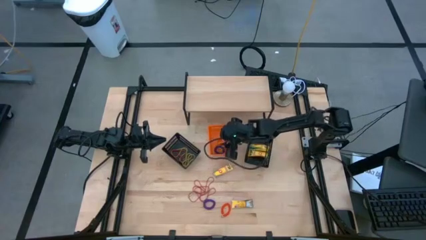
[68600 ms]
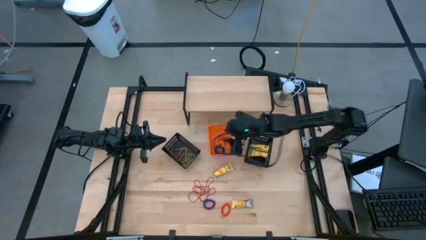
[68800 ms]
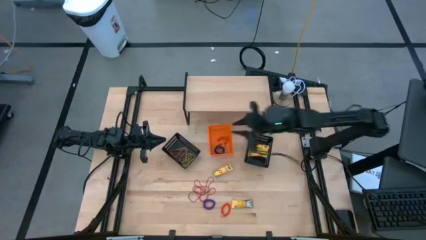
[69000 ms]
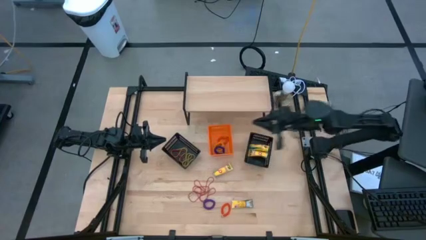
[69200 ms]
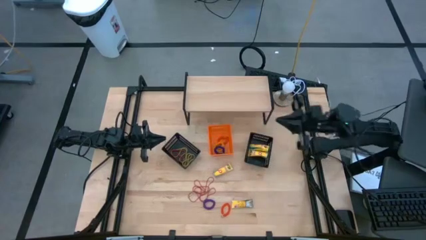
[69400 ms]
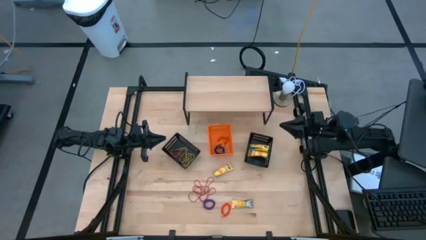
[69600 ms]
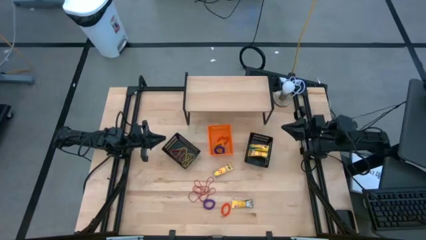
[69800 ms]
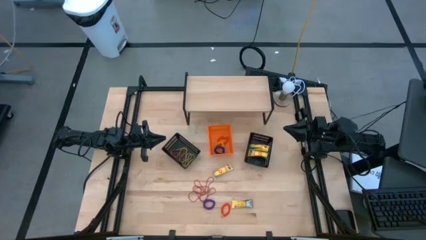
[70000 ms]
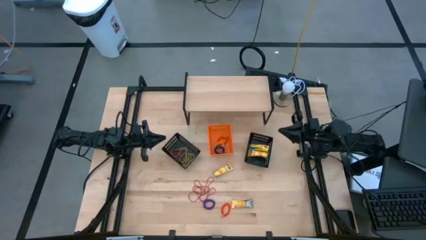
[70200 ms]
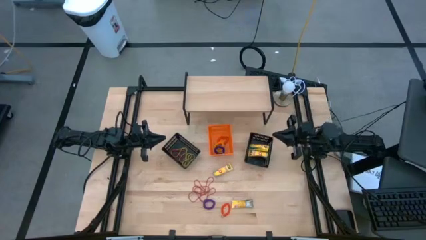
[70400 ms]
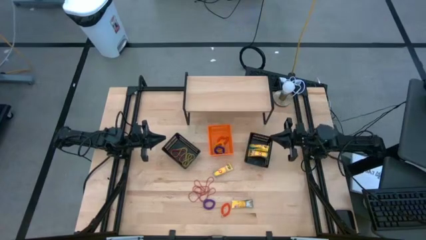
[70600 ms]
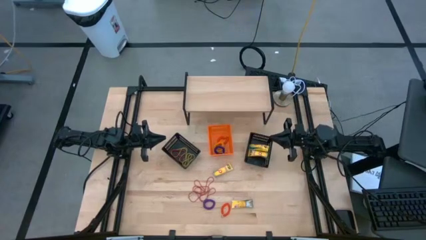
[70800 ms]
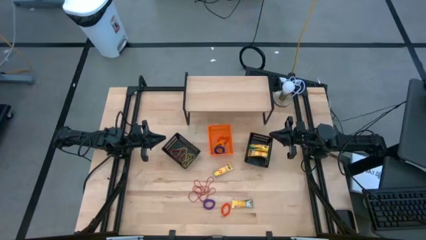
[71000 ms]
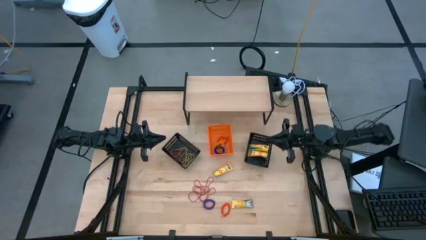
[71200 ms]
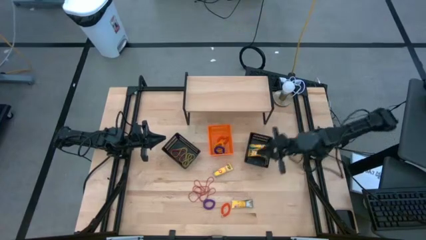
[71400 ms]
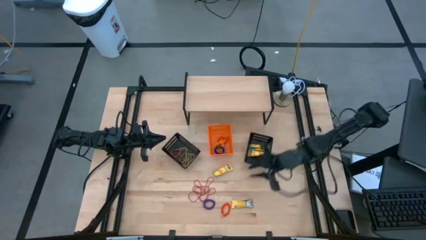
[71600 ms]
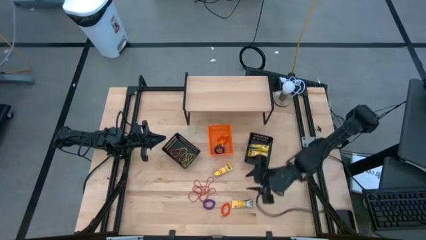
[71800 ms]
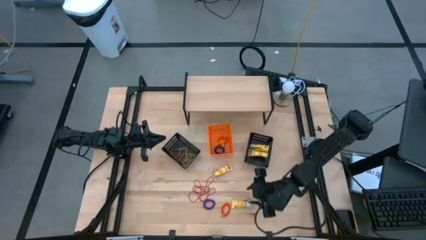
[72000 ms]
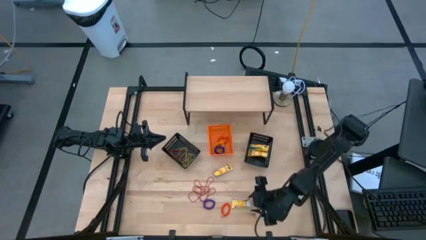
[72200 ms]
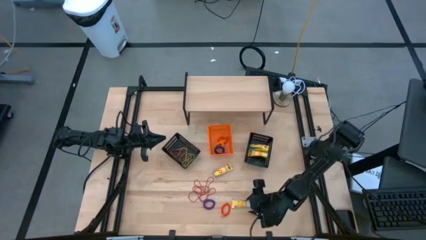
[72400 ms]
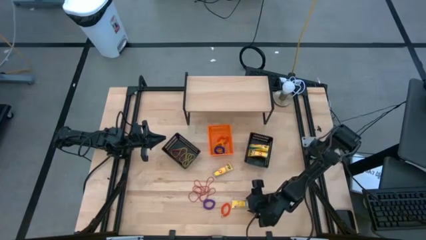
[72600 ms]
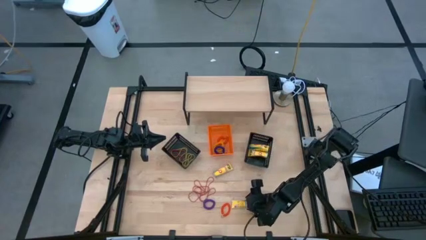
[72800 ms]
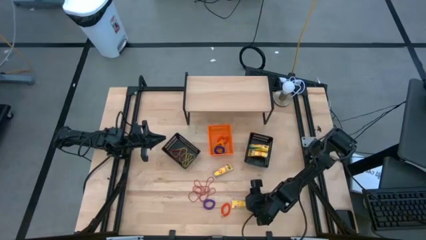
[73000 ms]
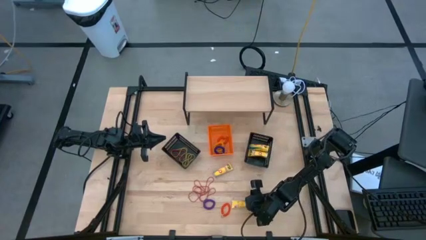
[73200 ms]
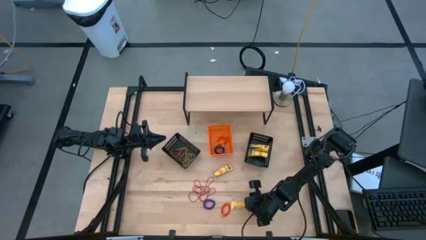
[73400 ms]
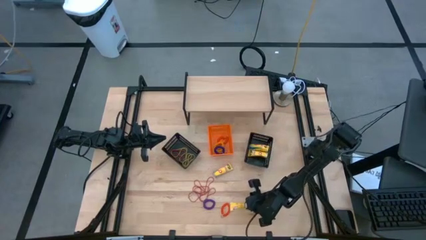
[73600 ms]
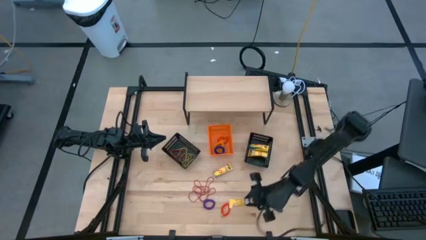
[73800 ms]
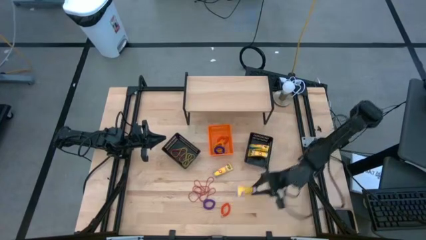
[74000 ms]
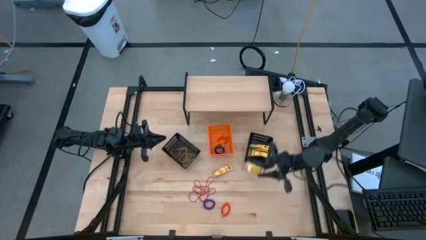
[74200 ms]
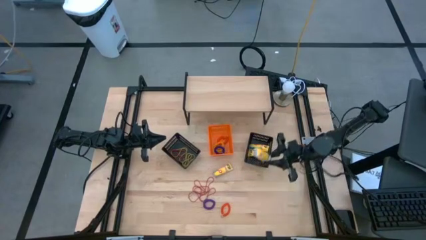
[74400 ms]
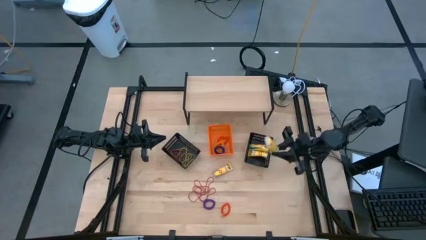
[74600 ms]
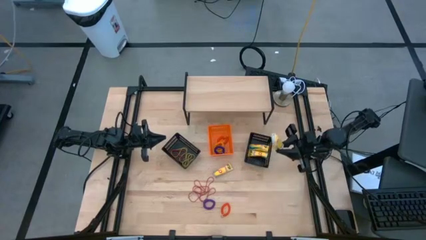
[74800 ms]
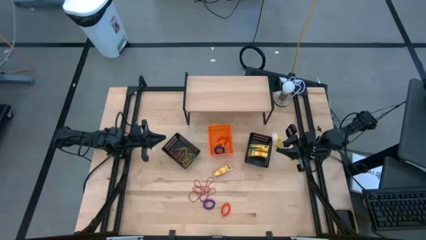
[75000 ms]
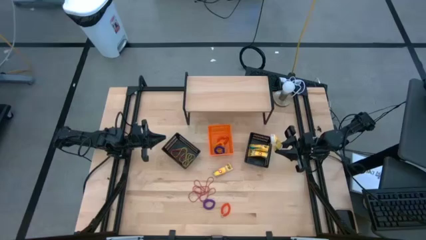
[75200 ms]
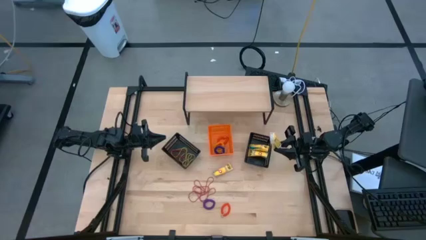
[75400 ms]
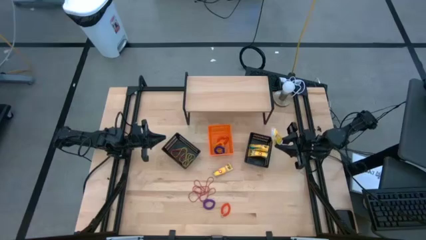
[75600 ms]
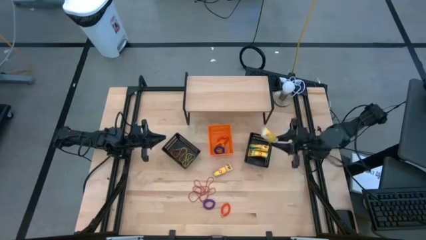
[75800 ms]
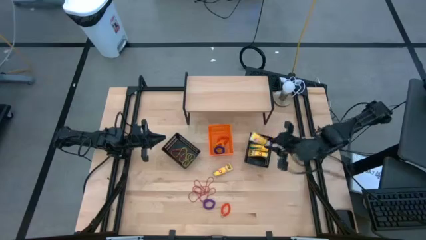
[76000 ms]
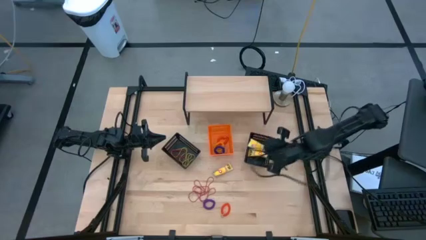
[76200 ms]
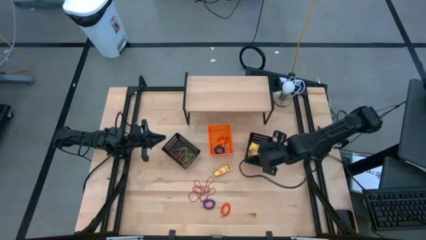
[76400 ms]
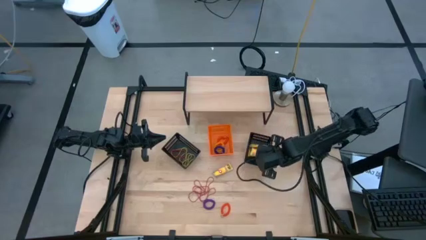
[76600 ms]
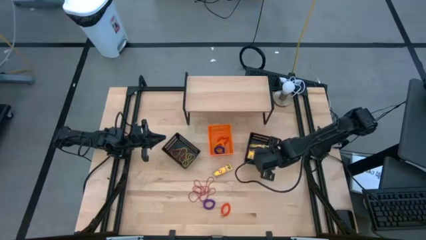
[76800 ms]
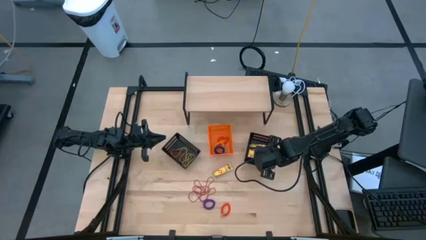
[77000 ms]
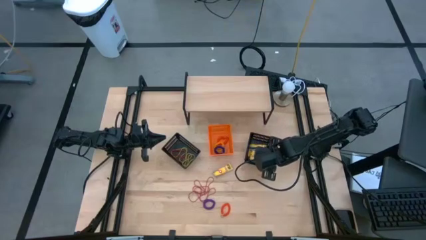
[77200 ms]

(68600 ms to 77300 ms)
Task: Pick & Place Office Desk Supplies
Put the yellow pack of crayons into the right black bin

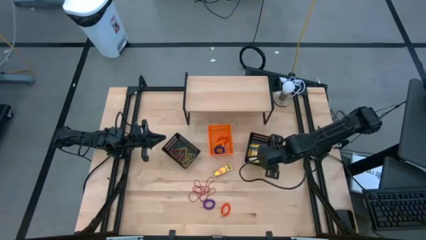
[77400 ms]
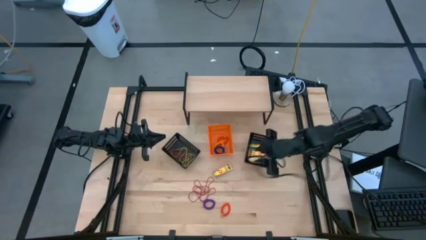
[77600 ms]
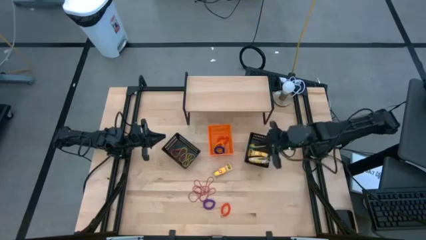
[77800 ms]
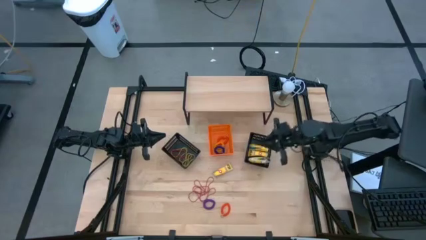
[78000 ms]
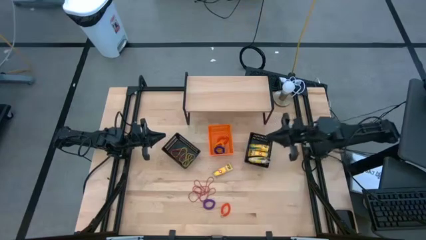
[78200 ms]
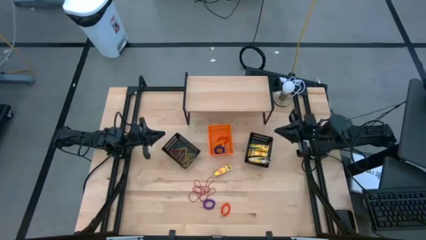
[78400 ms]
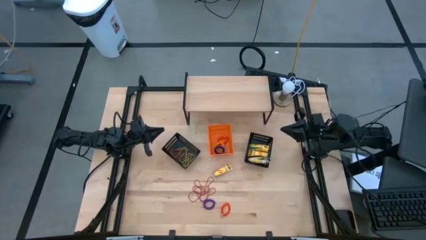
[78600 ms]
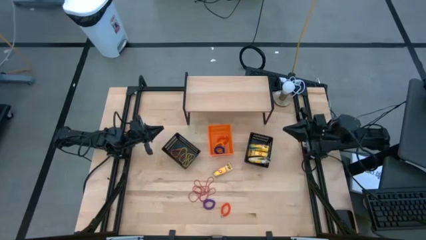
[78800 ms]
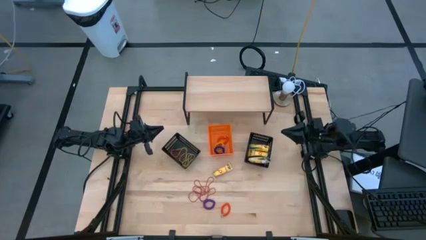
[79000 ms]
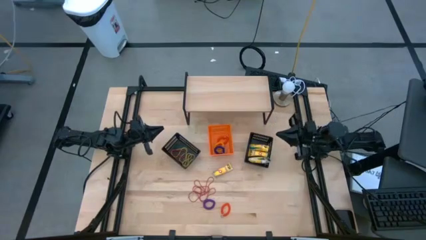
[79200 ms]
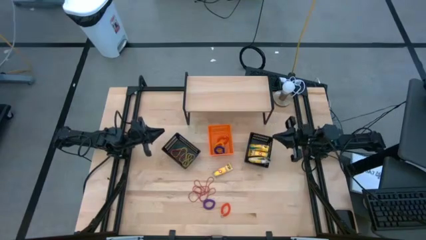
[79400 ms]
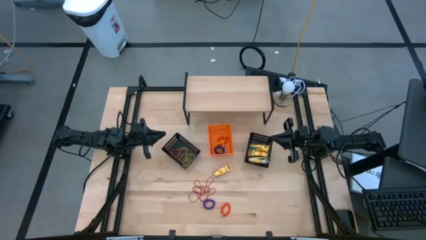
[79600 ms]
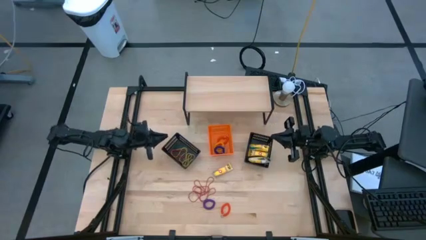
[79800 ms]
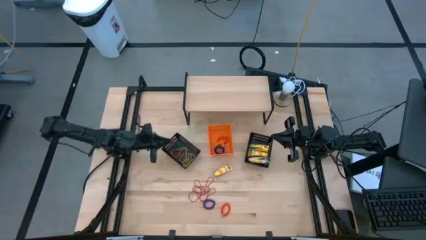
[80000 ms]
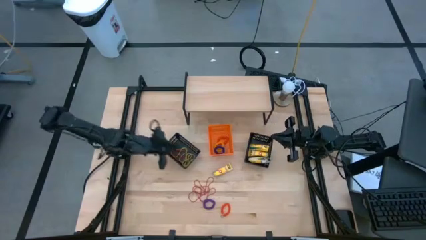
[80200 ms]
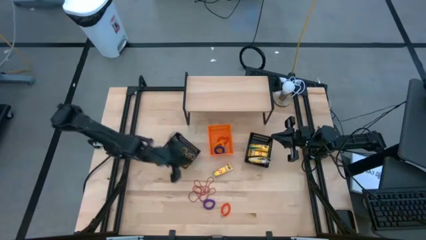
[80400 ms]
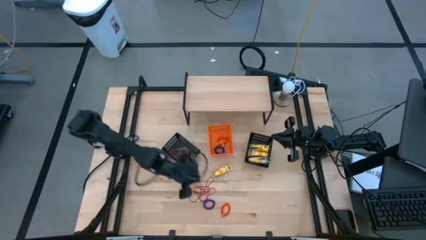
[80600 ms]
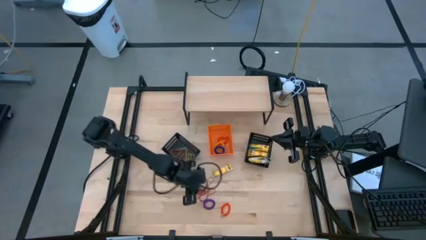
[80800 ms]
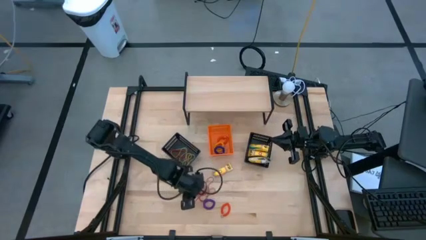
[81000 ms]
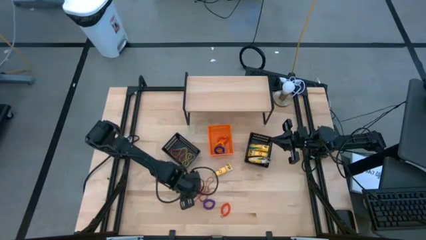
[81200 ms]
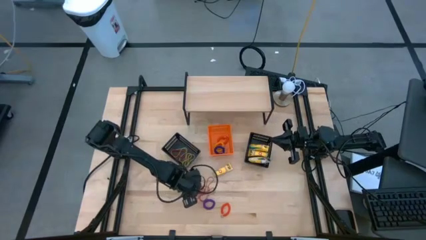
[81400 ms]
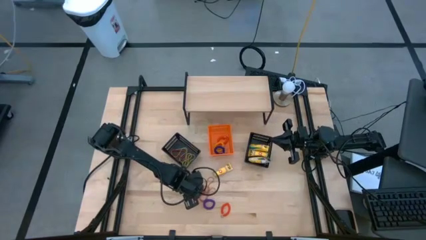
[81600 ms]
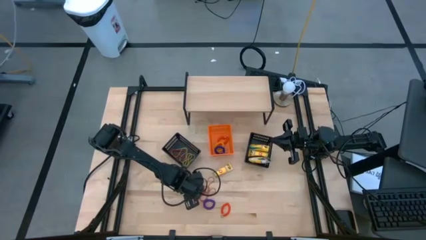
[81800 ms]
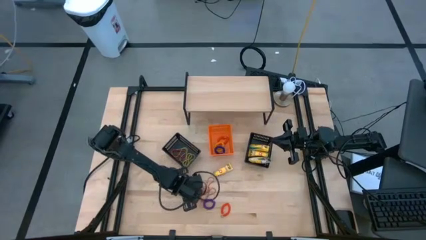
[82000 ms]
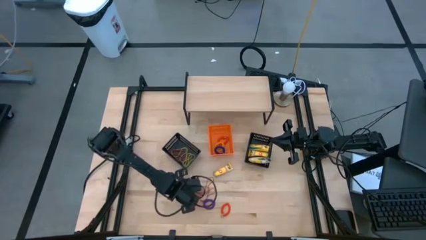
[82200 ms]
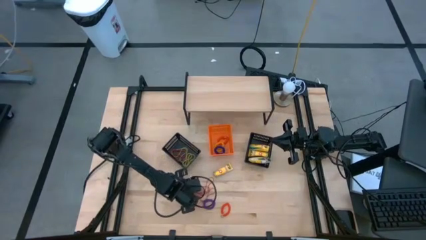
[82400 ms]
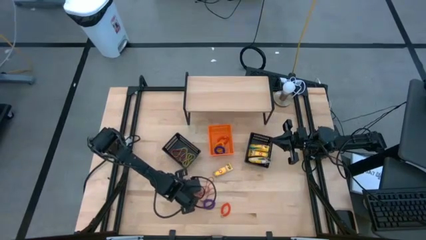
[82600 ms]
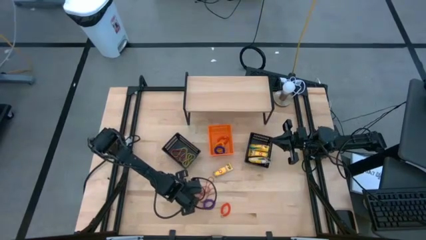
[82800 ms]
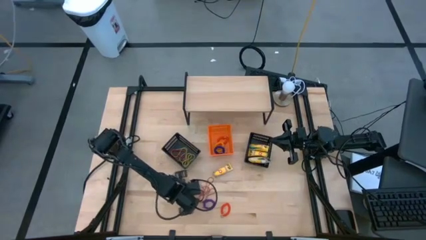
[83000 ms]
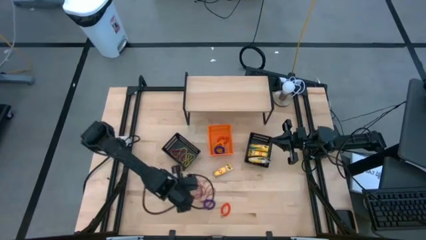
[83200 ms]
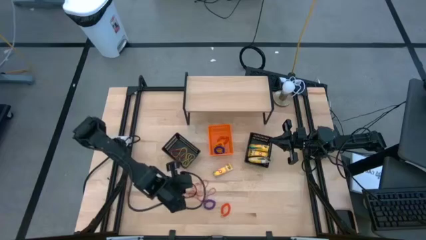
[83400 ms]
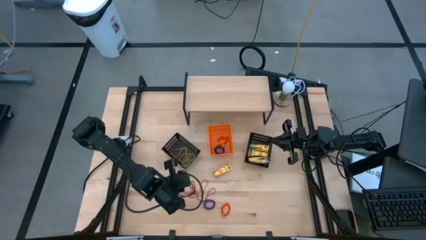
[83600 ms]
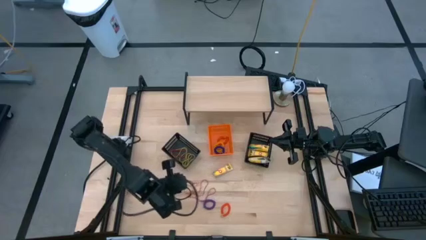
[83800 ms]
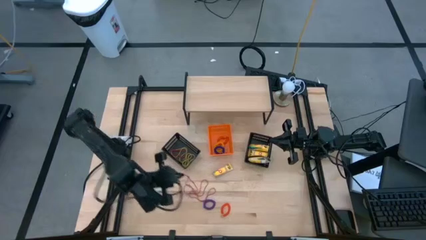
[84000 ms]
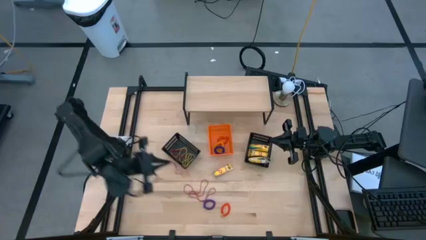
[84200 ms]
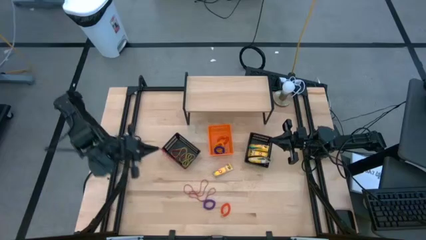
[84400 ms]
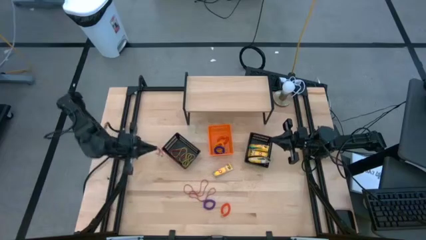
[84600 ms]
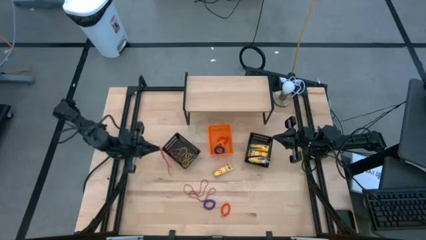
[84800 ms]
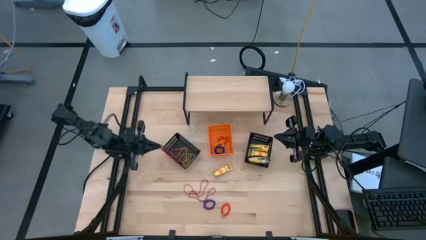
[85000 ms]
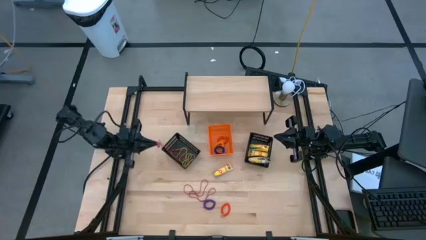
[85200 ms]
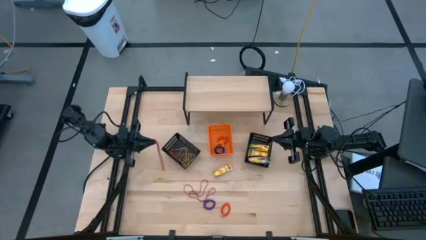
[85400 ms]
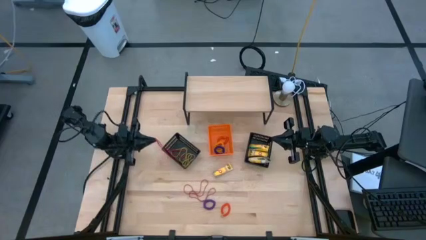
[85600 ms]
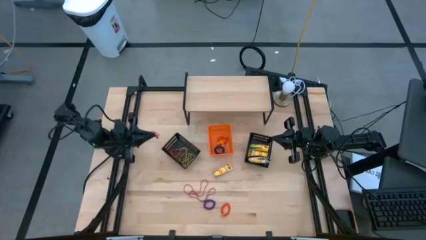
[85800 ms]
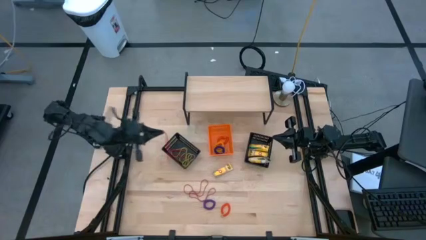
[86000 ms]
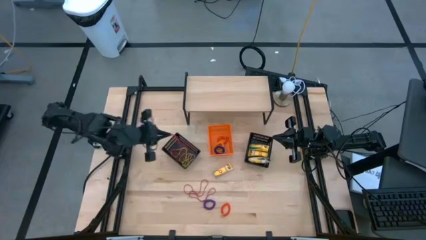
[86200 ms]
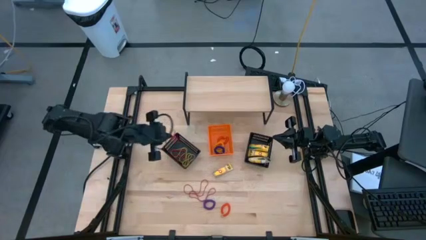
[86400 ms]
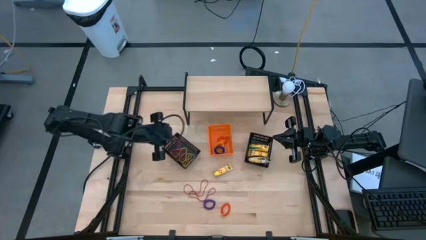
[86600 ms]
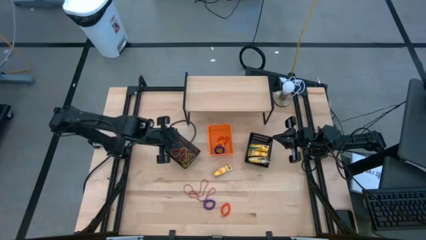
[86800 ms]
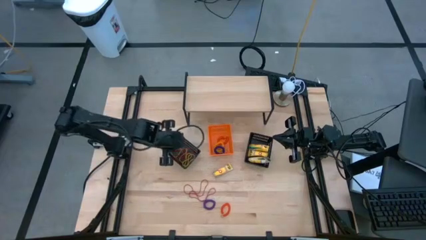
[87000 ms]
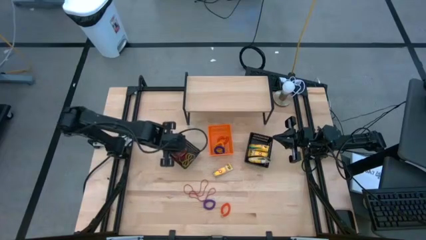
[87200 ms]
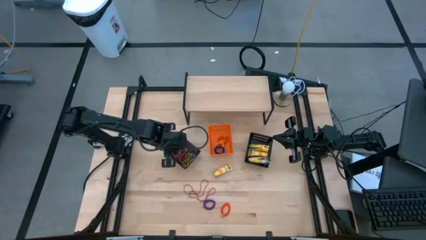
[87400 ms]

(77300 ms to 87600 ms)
Put the red rubber band into the left black bin
